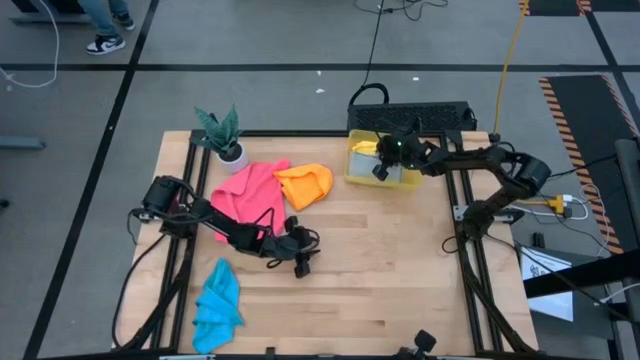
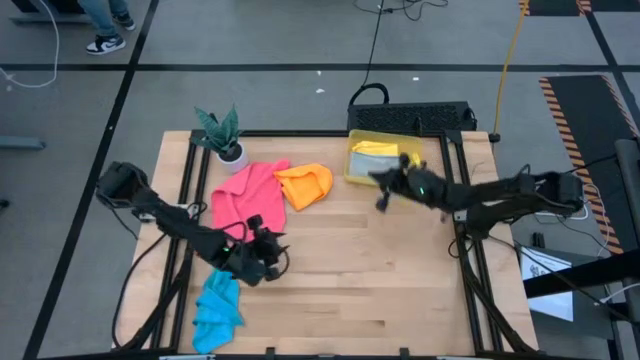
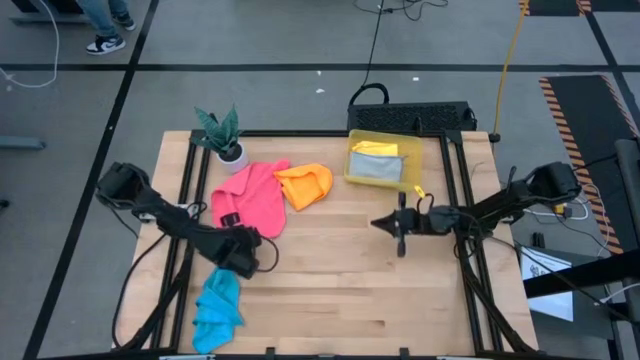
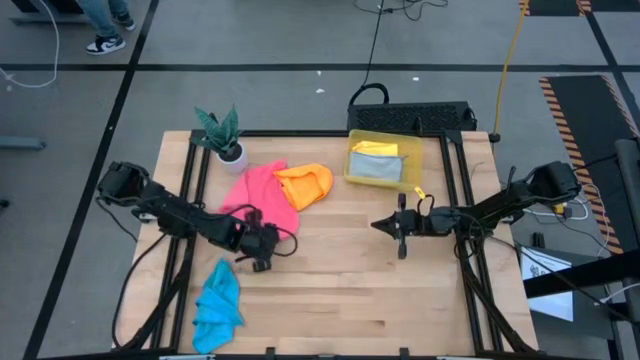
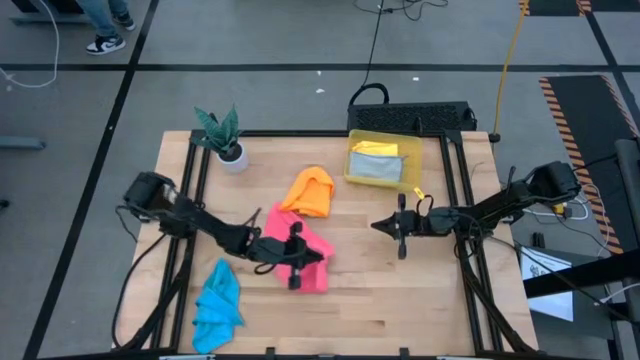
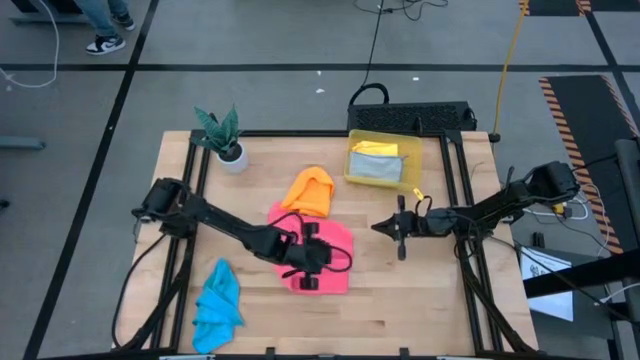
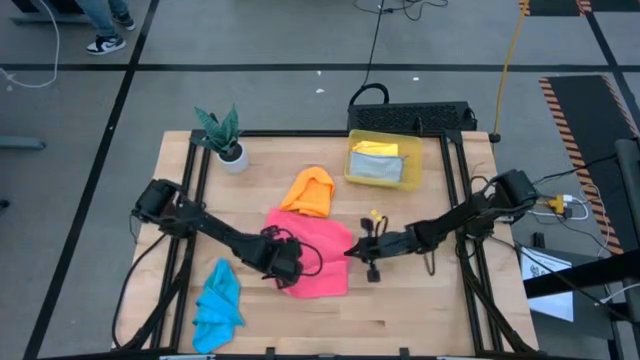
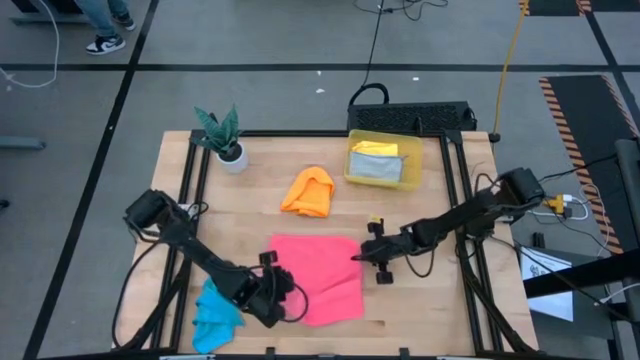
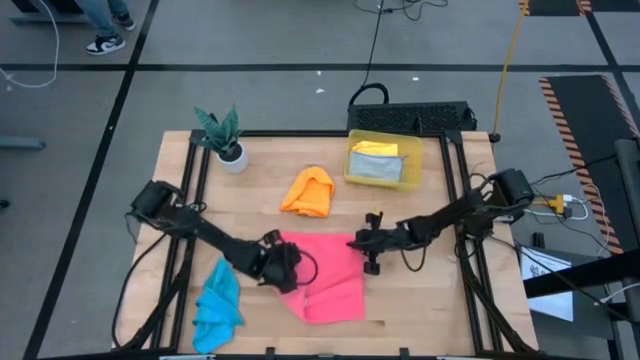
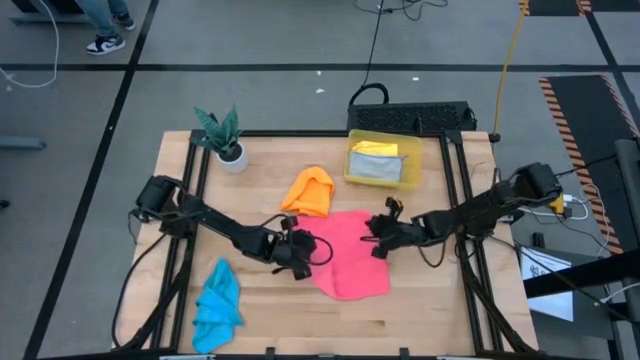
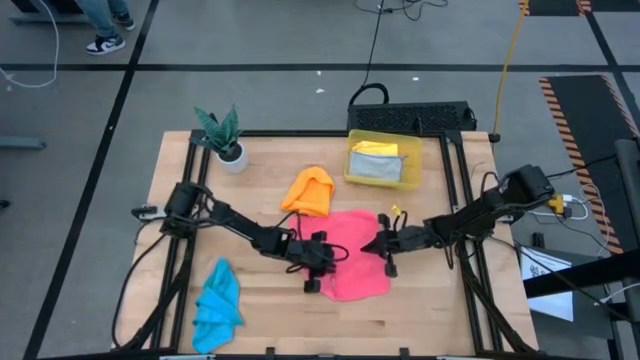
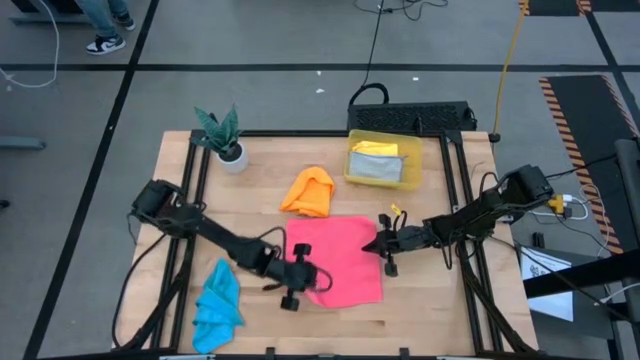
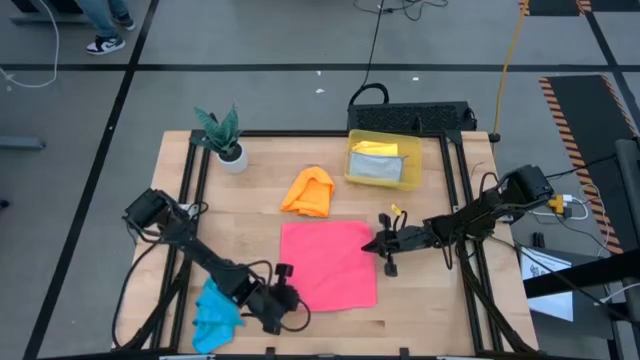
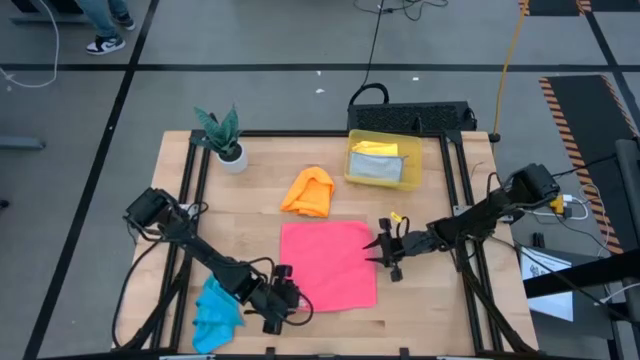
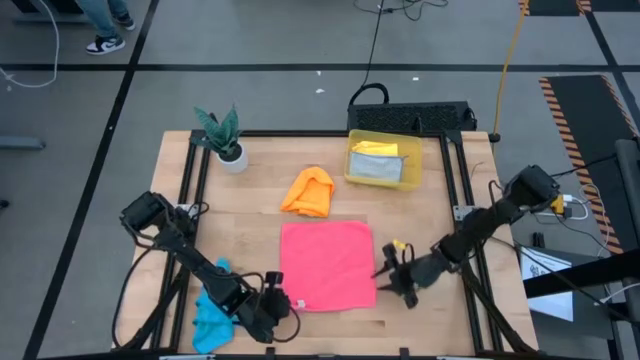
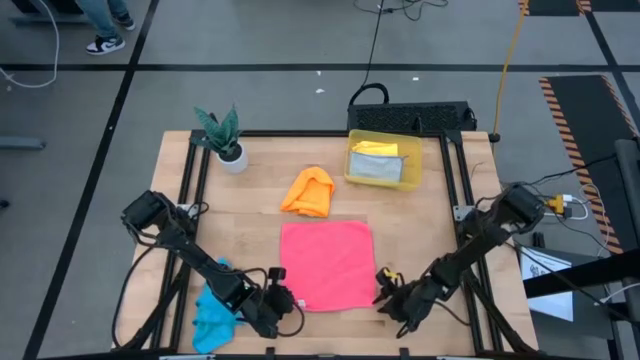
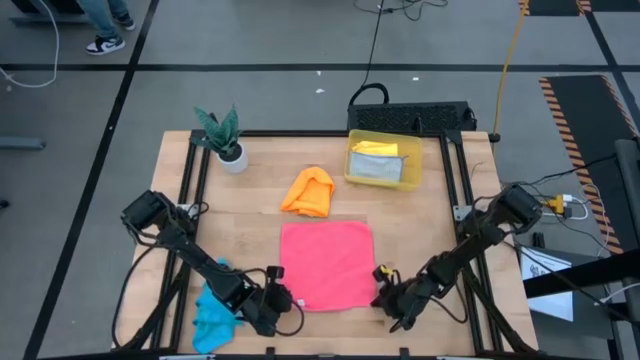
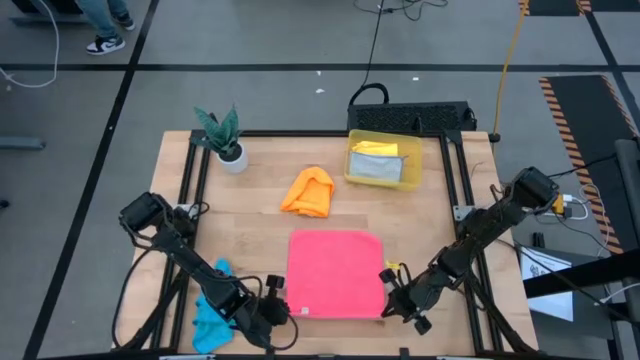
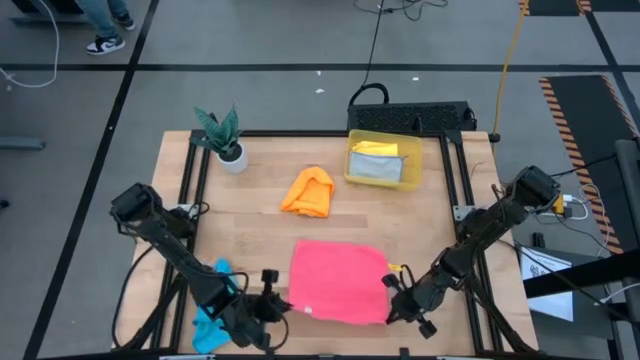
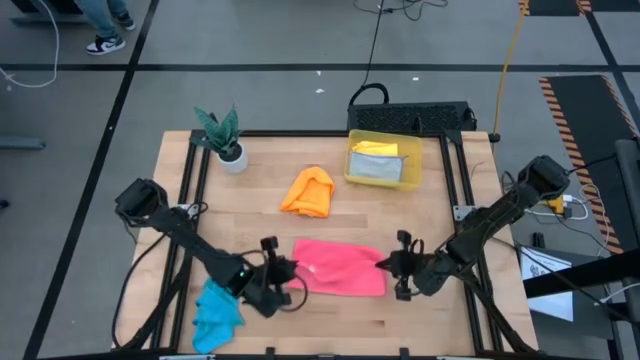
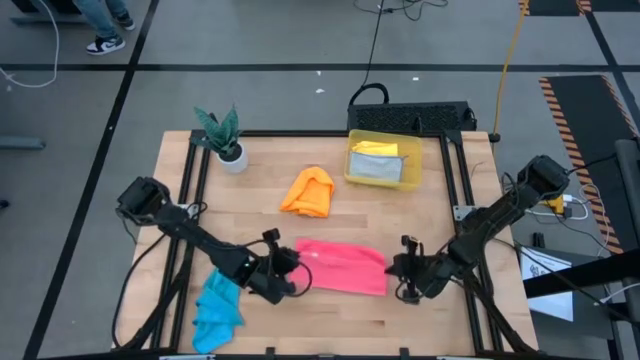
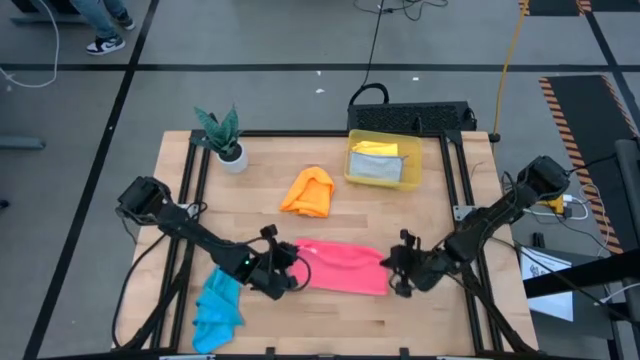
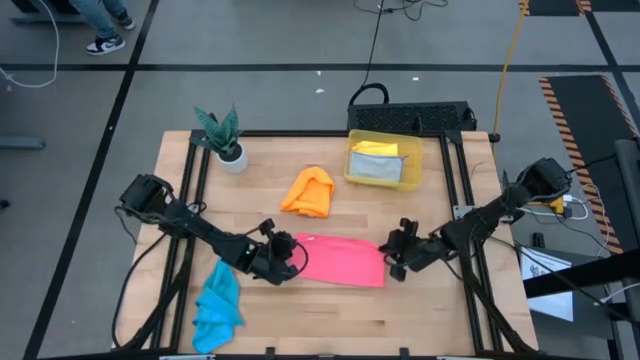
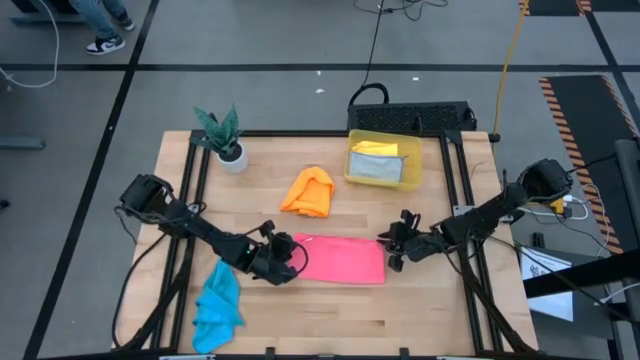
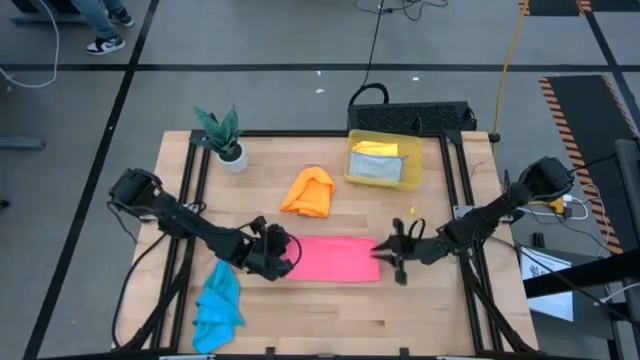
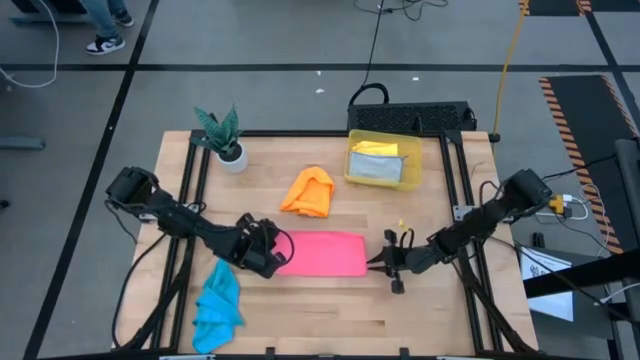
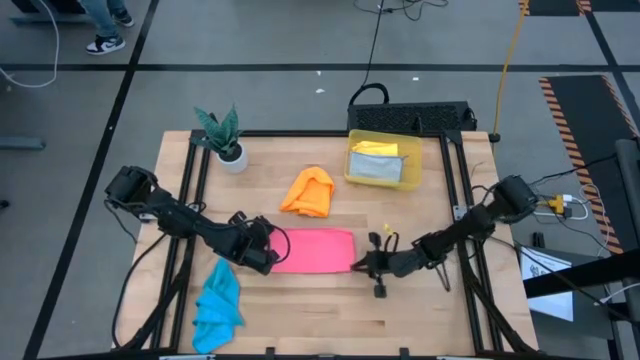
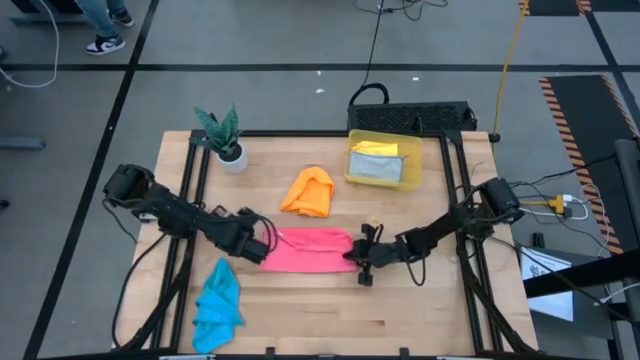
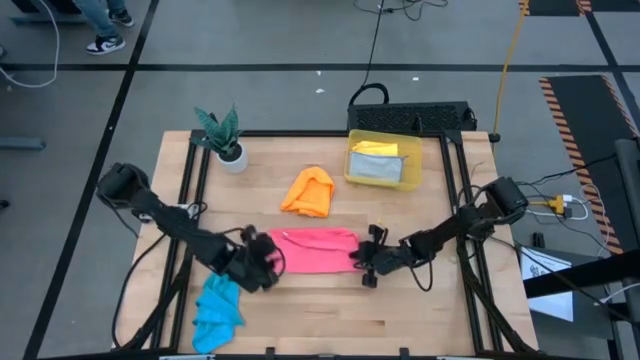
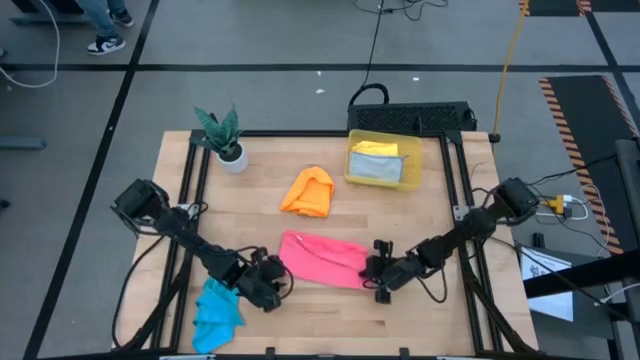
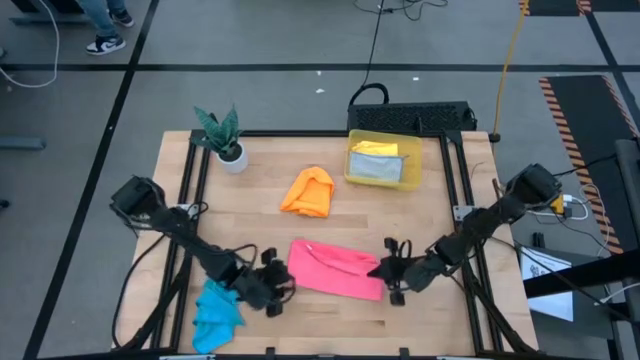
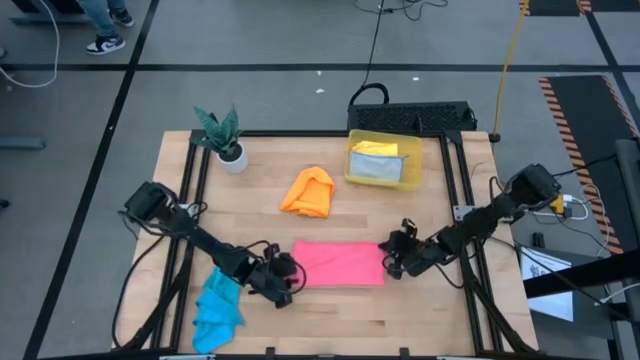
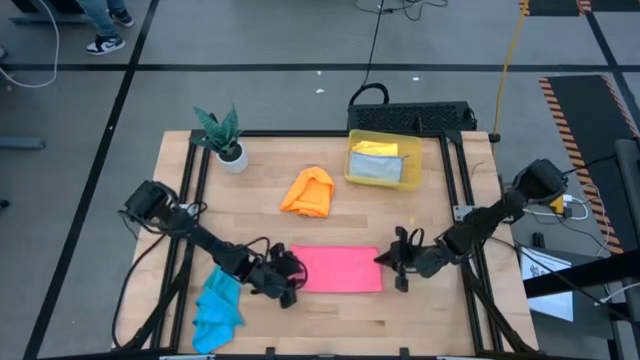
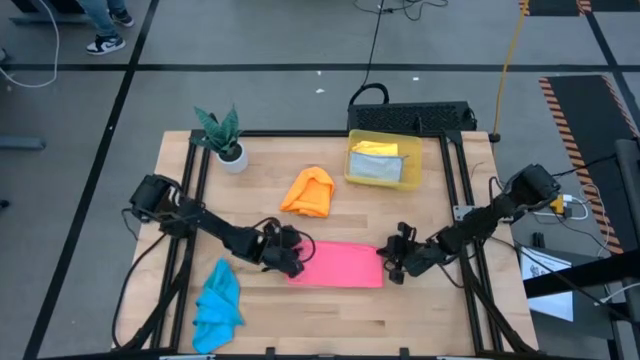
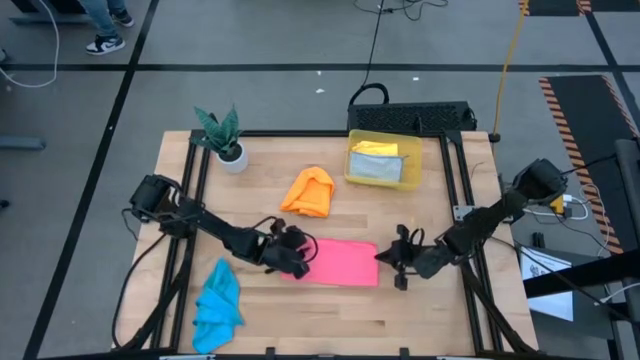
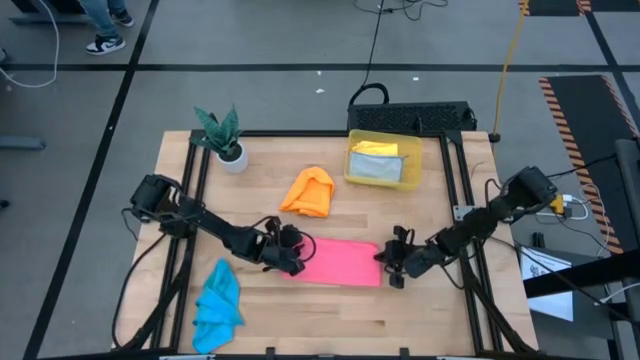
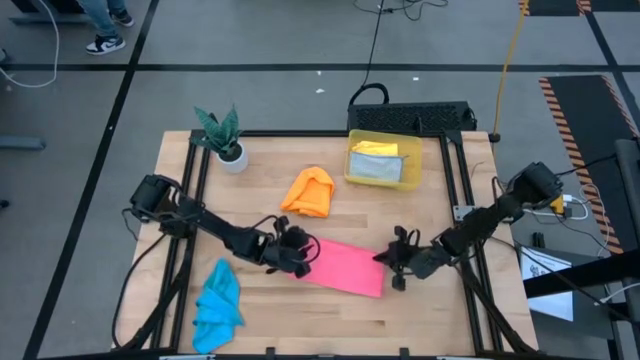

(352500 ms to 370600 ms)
Task: Fold microfiber towels
Fold the pink kitchen towel
